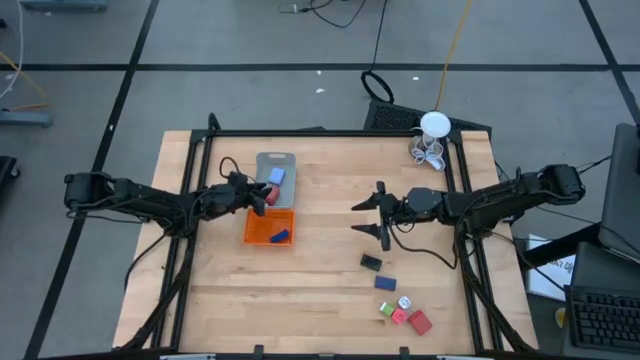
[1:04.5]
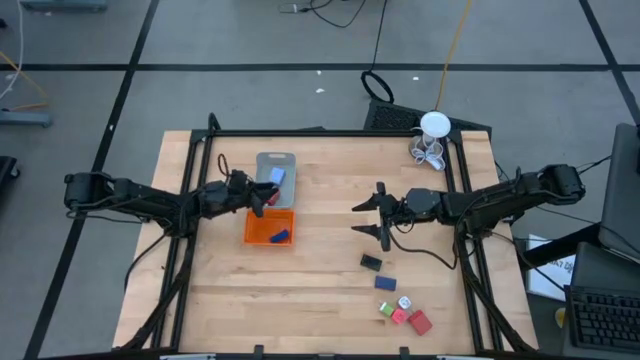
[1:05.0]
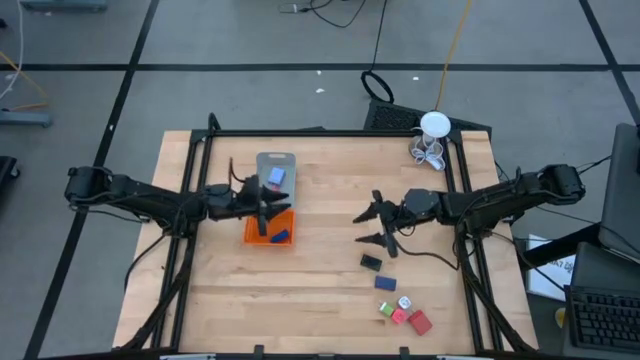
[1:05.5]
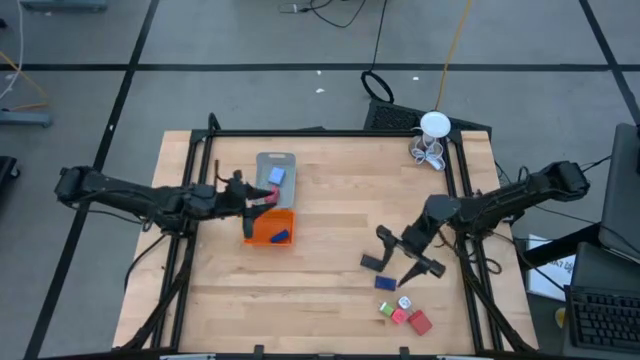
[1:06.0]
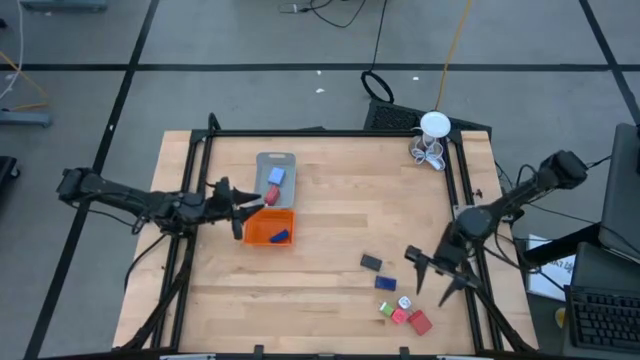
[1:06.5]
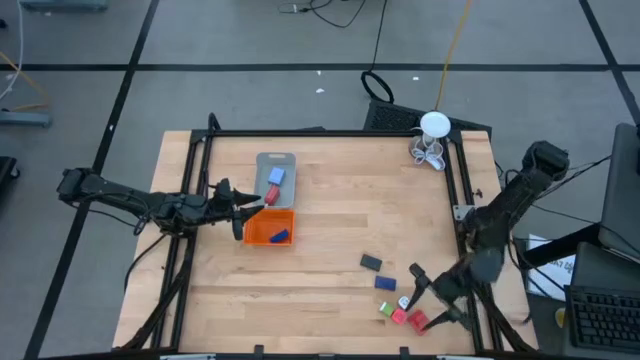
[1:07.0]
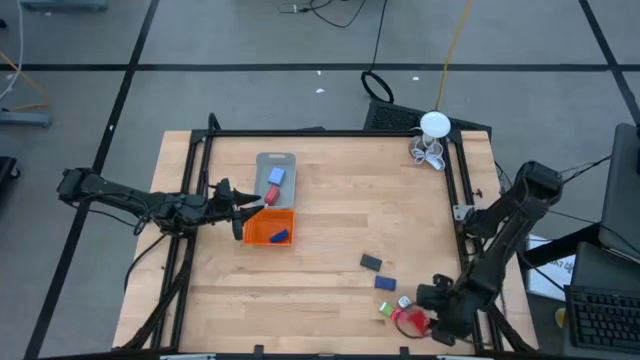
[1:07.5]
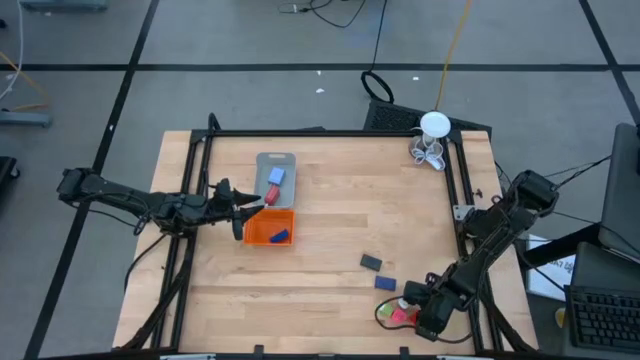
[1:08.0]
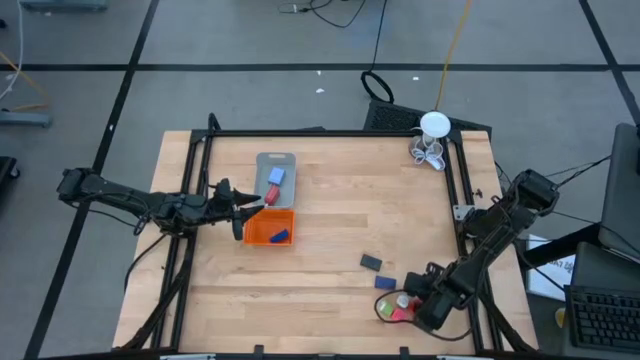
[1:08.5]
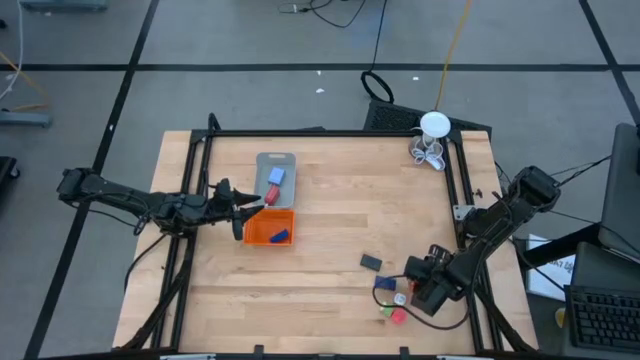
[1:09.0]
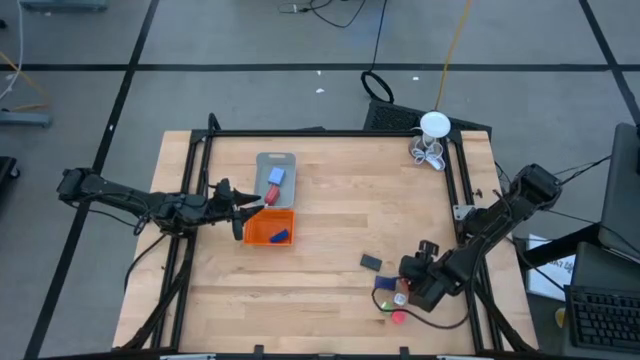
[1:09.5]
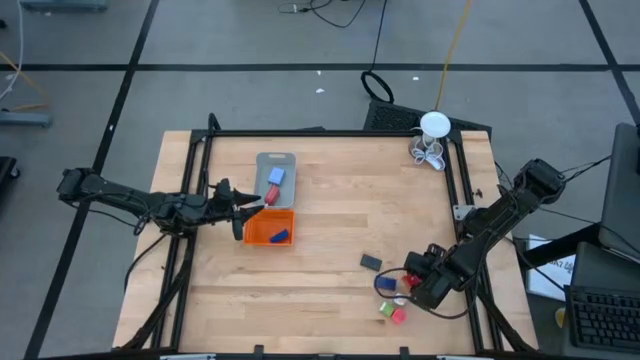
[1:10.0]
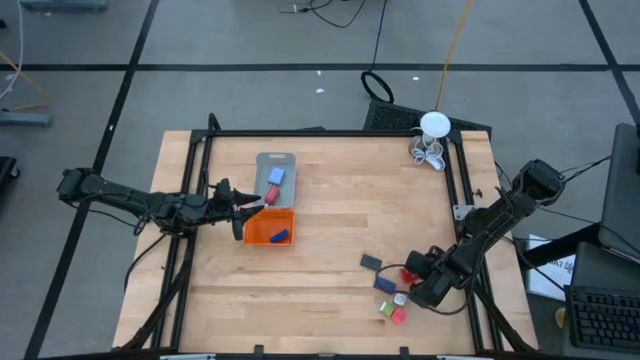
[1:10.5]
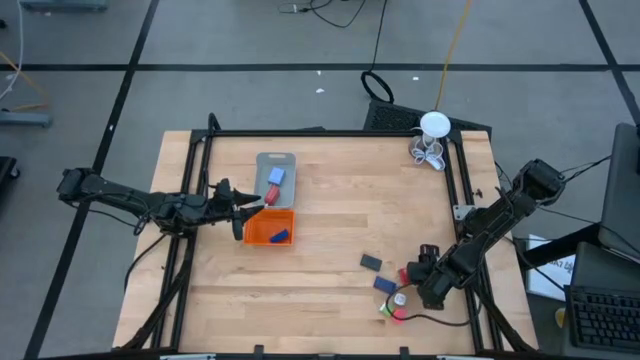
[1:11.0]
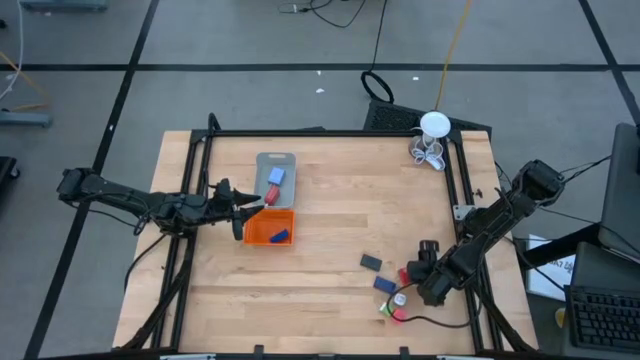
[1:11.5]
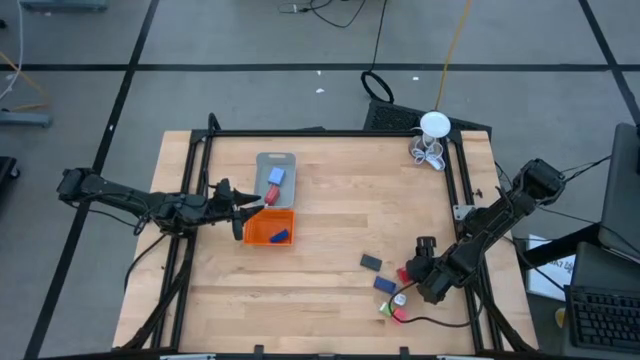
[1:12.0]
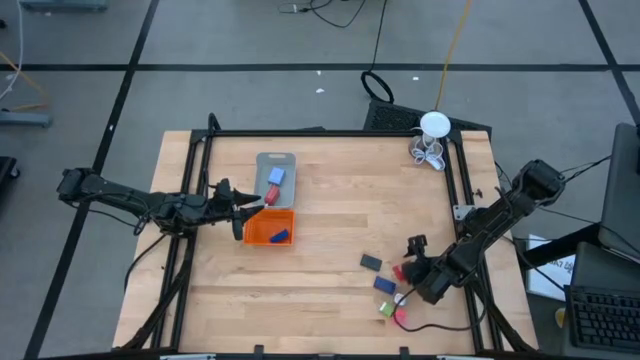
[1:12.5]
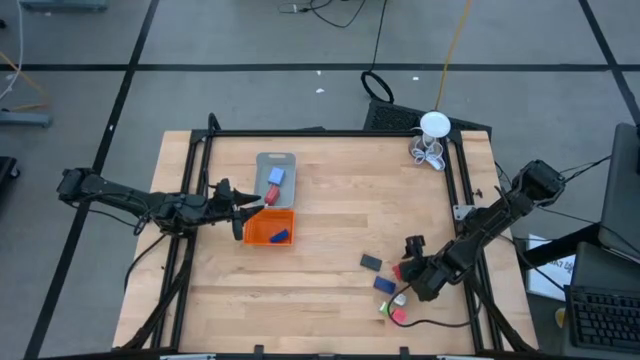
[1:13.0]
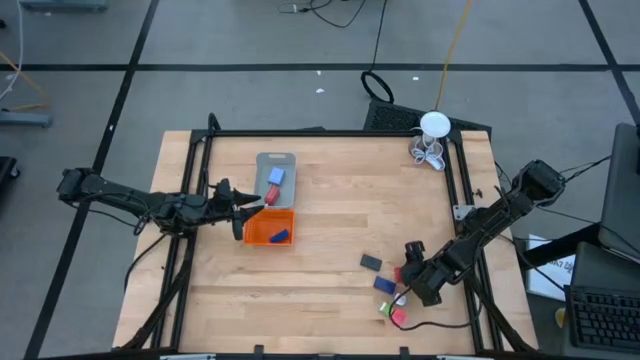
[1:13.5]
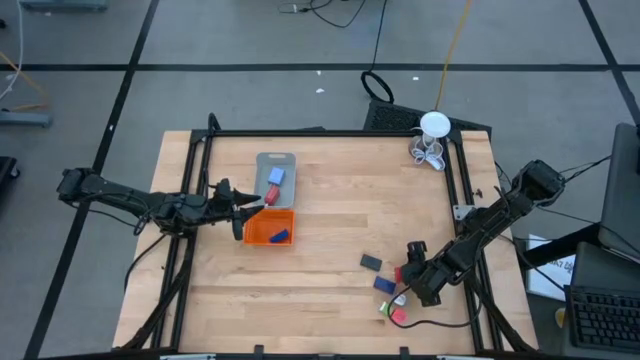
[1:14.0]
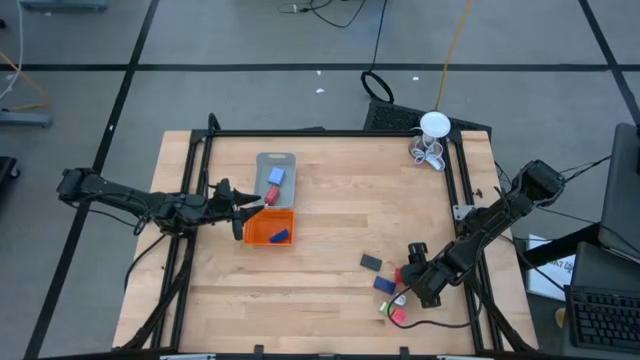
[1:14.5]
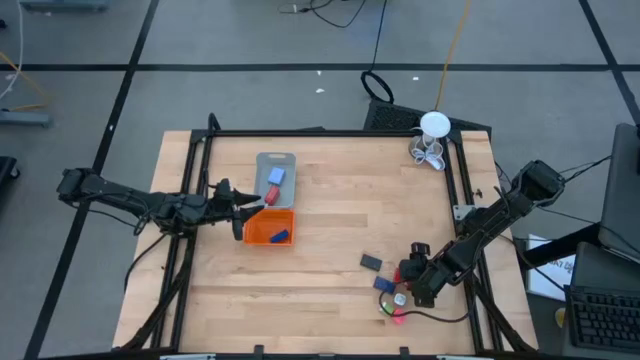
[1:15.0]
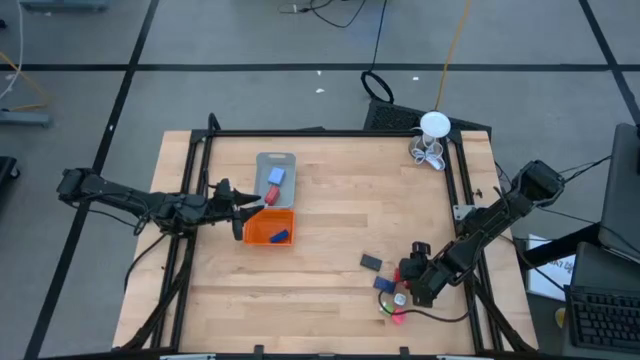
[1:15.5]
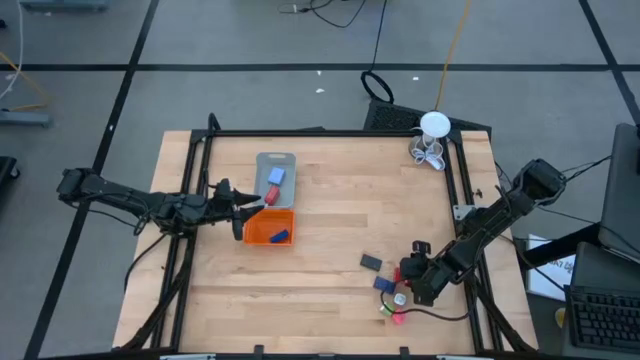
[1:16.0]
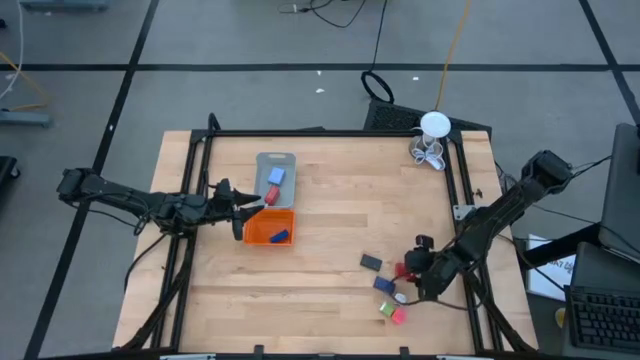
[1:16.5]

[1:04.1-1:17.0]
Task: Pick & Place Office items
Put the red charger adapter into the gray bin
